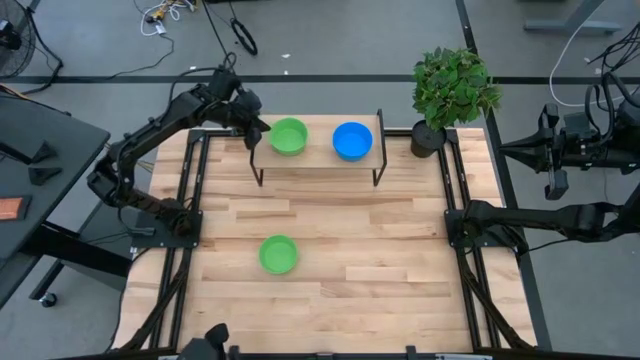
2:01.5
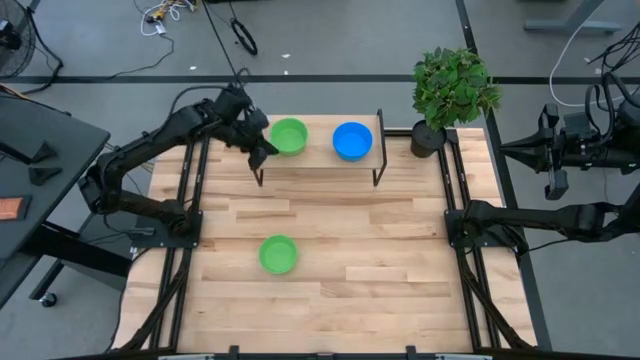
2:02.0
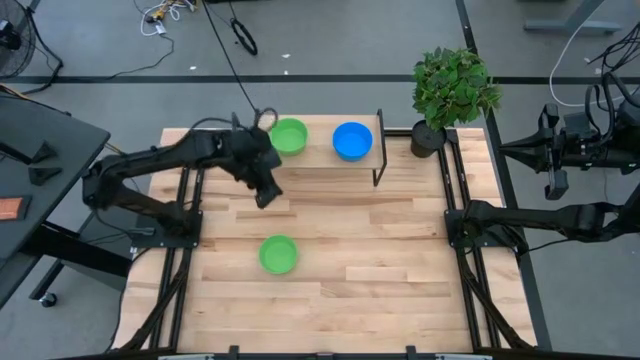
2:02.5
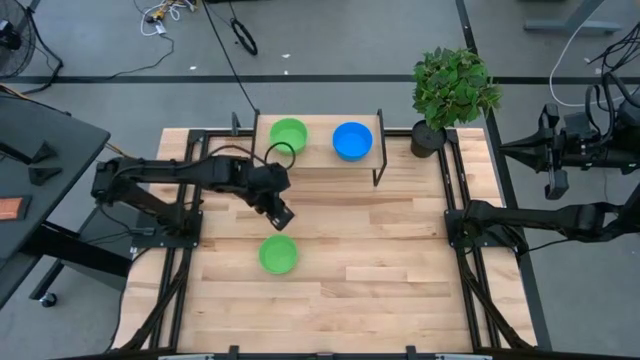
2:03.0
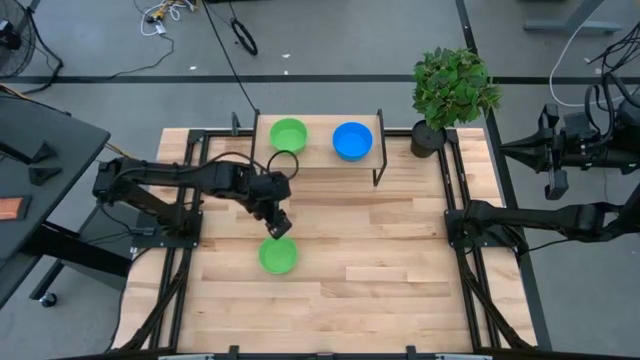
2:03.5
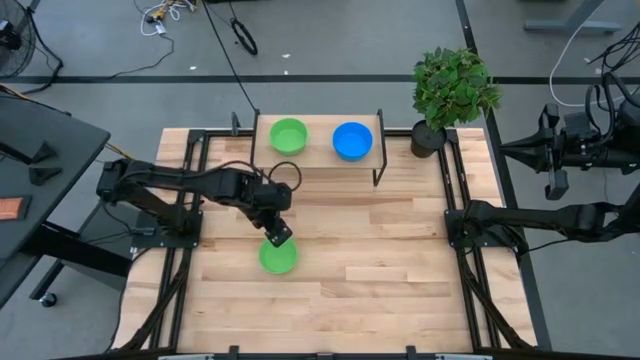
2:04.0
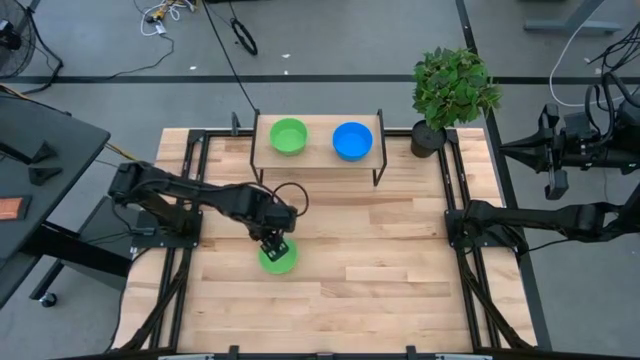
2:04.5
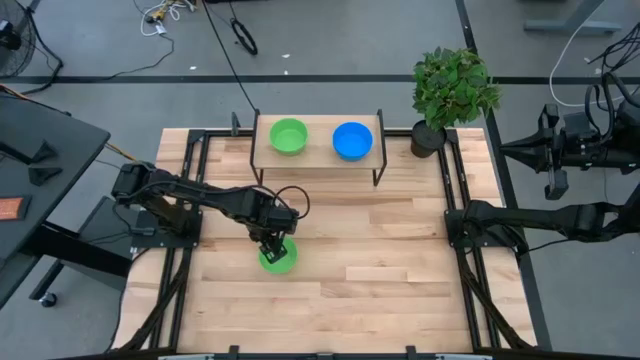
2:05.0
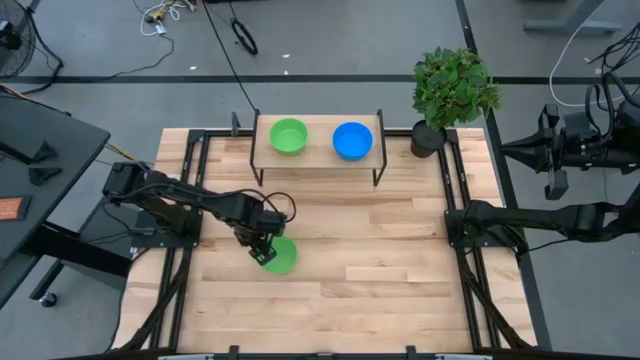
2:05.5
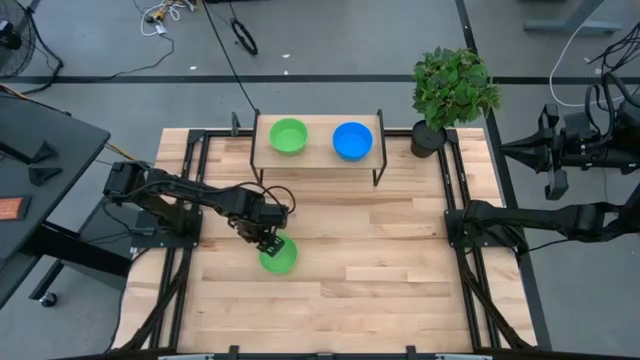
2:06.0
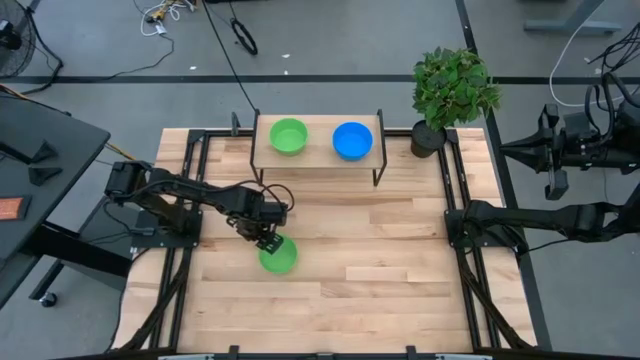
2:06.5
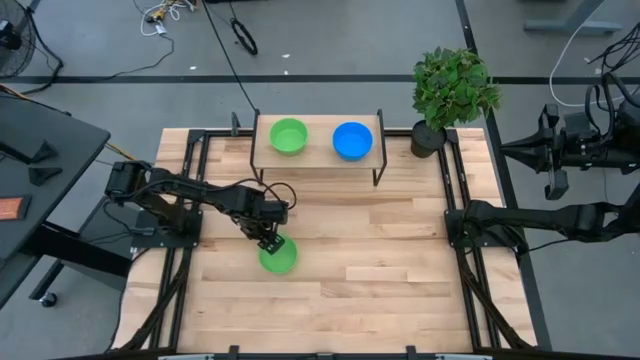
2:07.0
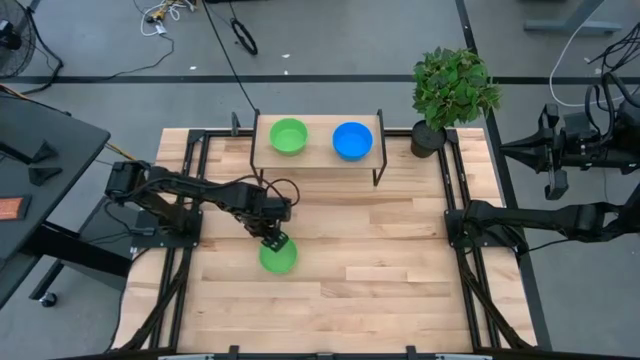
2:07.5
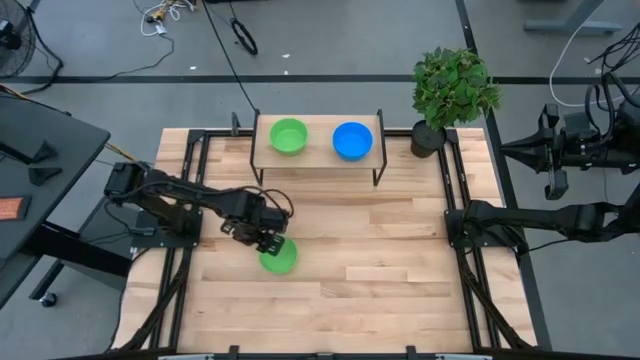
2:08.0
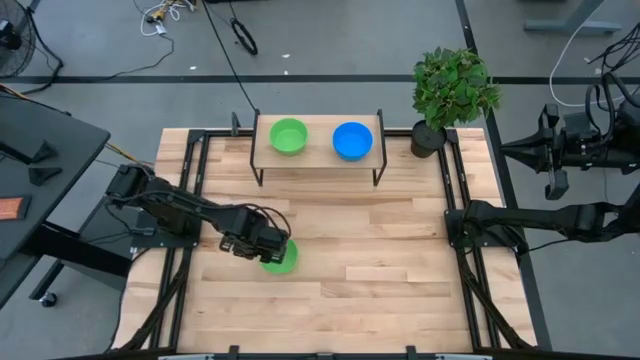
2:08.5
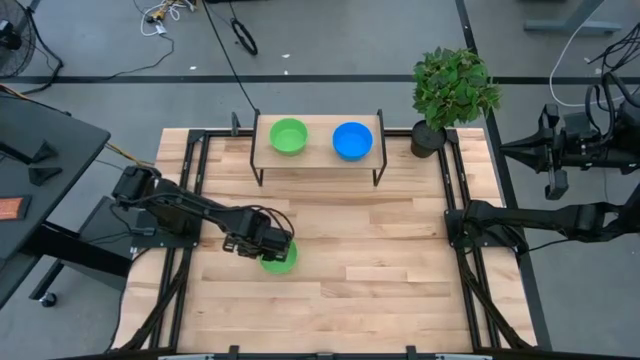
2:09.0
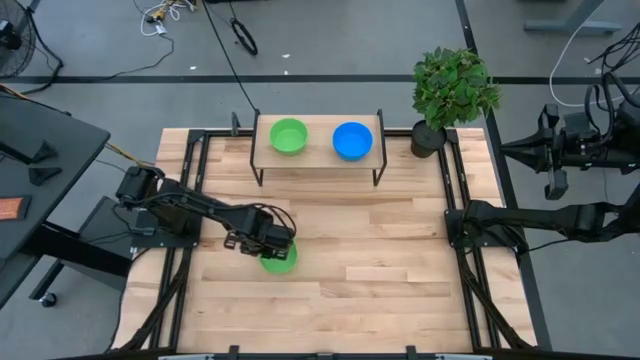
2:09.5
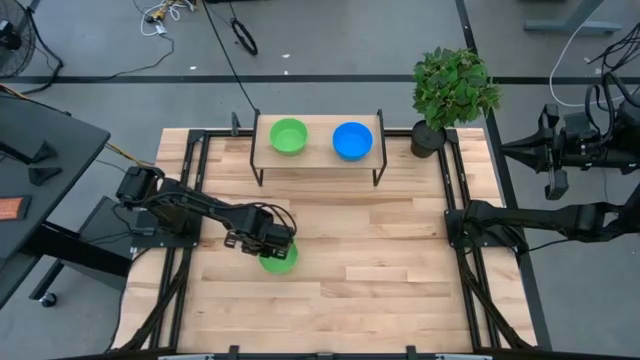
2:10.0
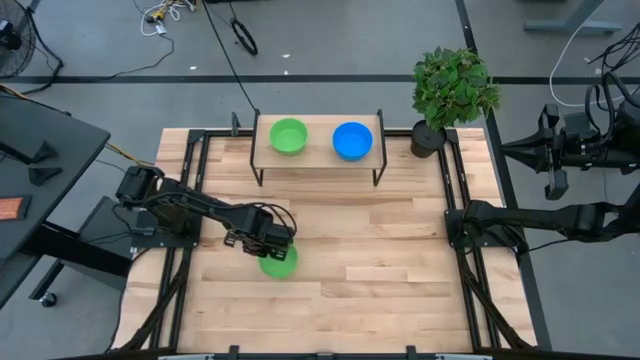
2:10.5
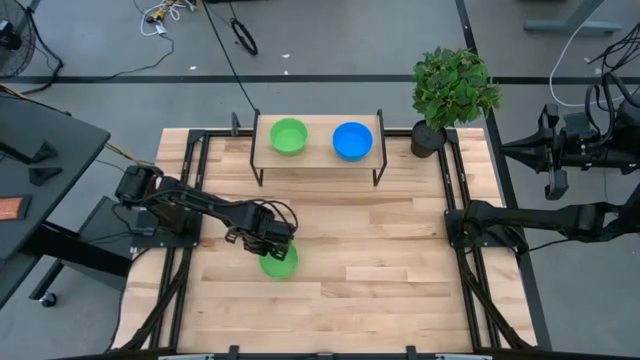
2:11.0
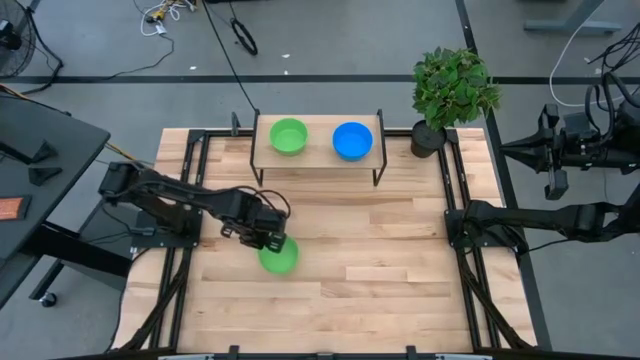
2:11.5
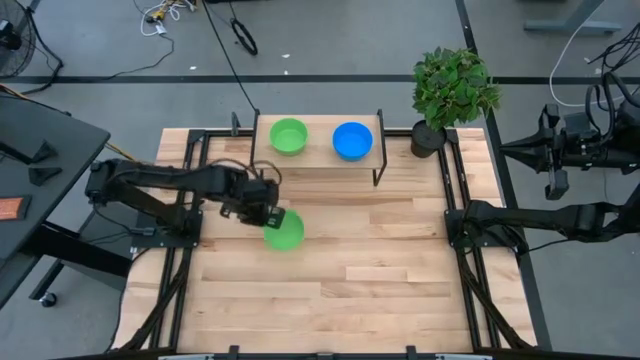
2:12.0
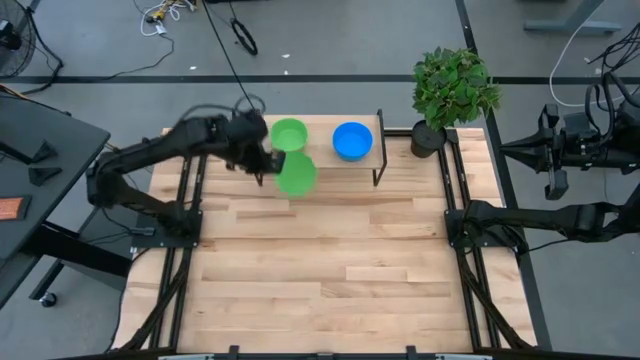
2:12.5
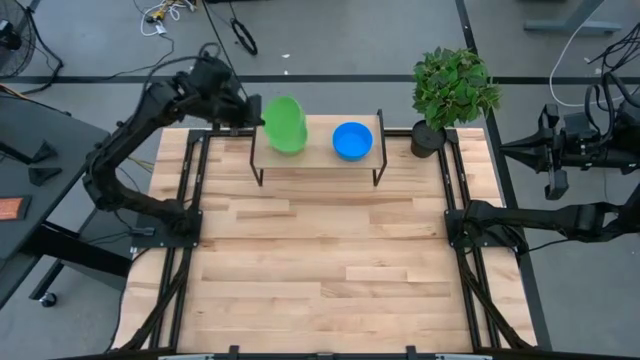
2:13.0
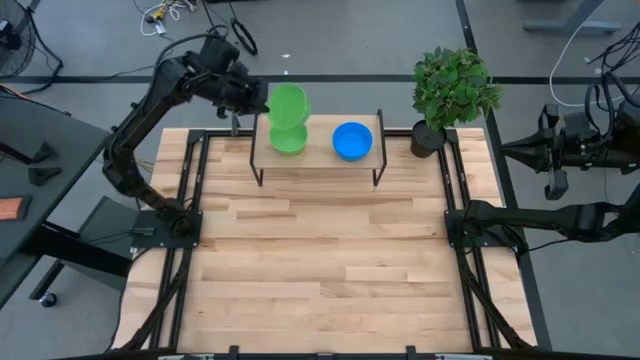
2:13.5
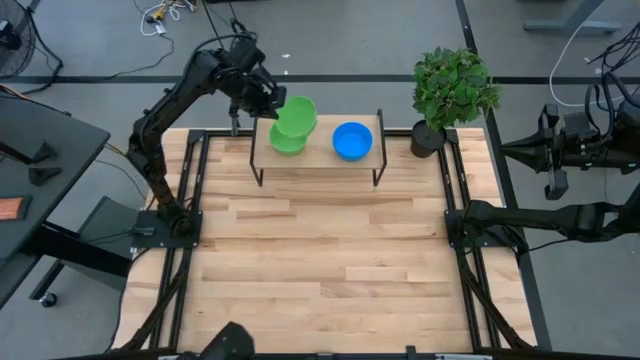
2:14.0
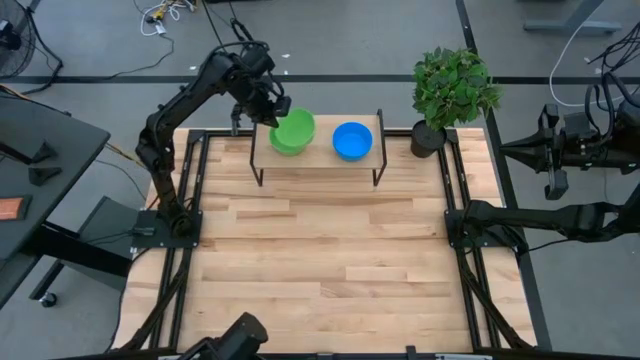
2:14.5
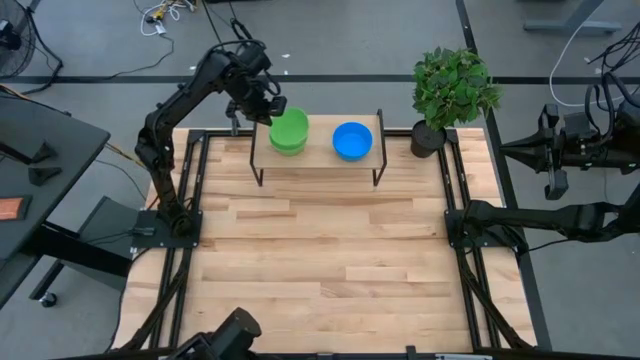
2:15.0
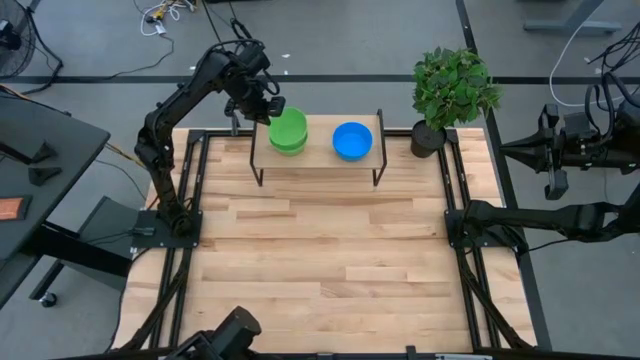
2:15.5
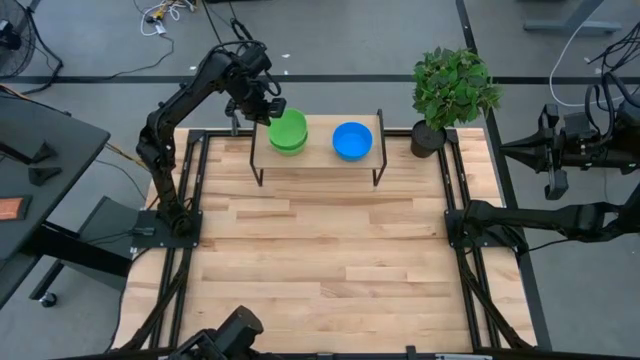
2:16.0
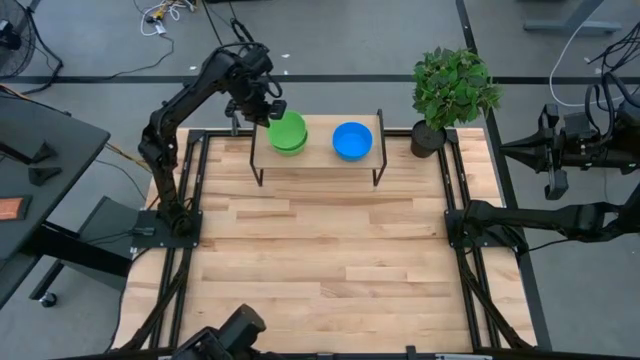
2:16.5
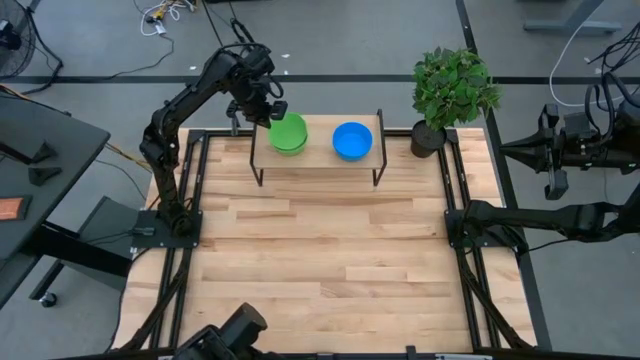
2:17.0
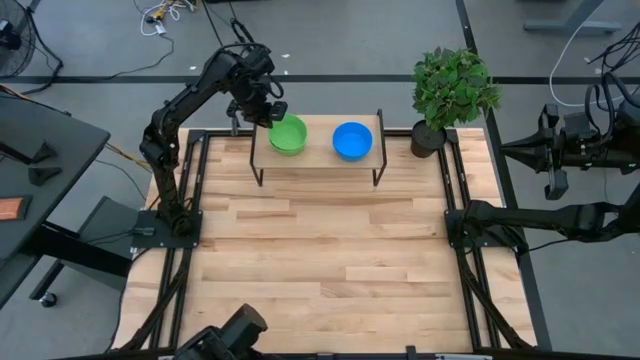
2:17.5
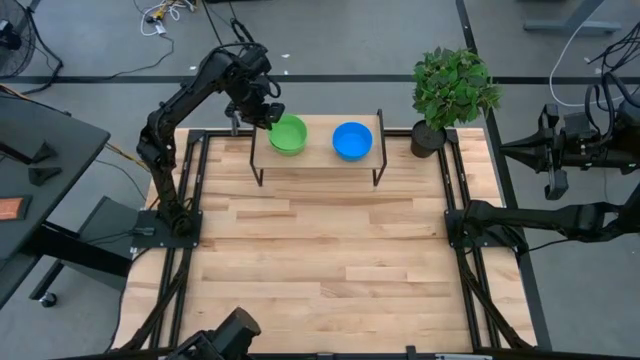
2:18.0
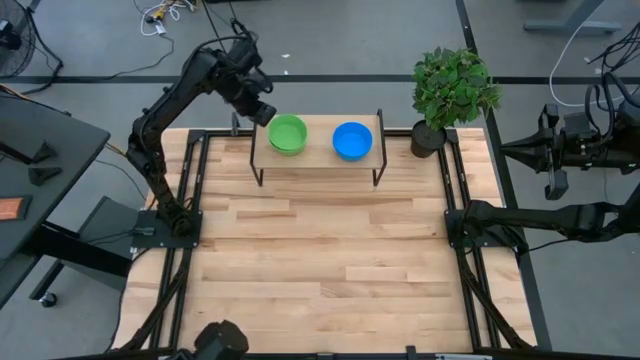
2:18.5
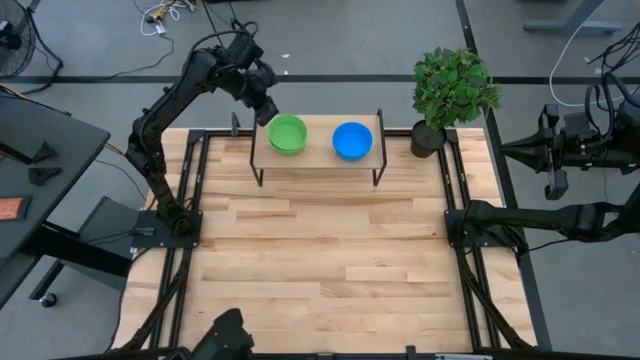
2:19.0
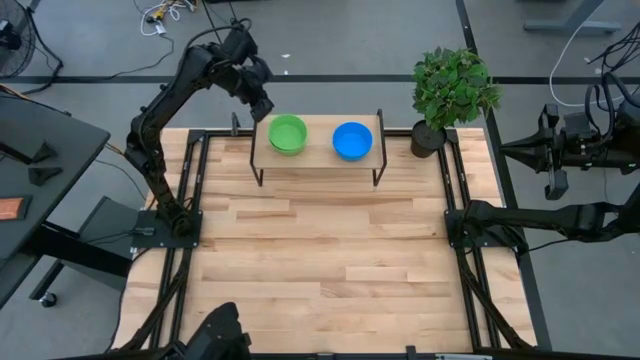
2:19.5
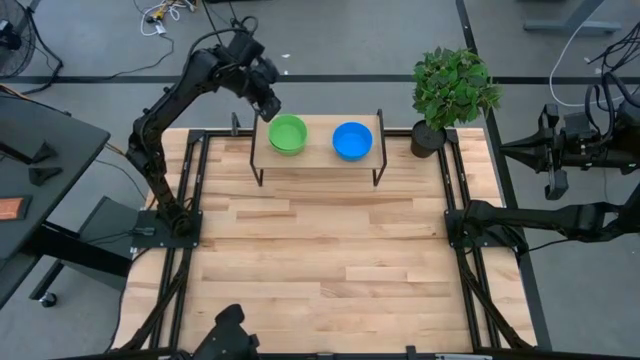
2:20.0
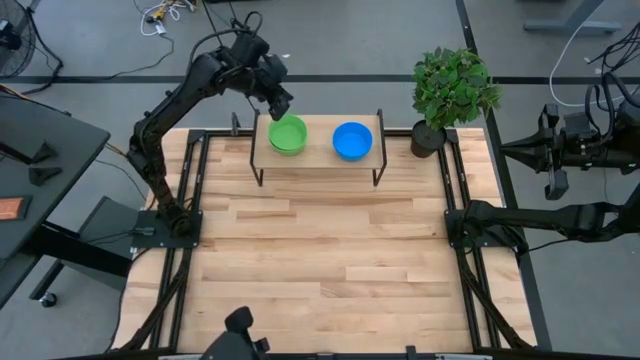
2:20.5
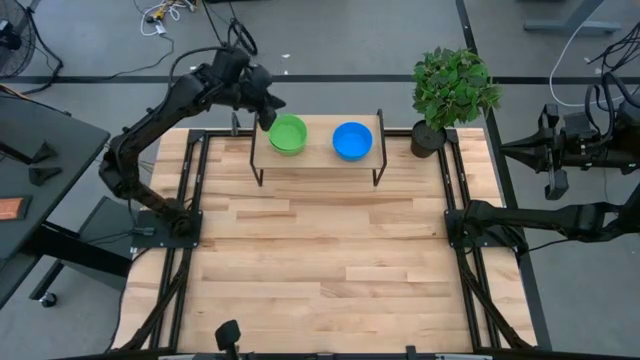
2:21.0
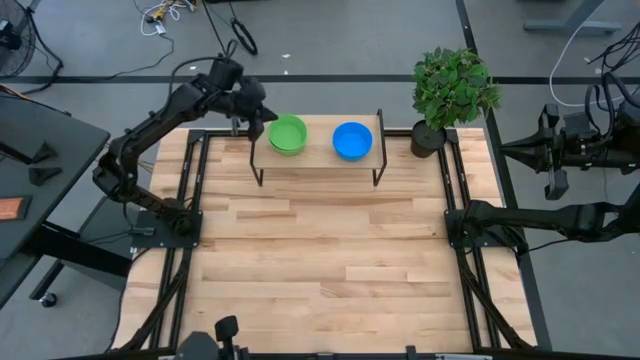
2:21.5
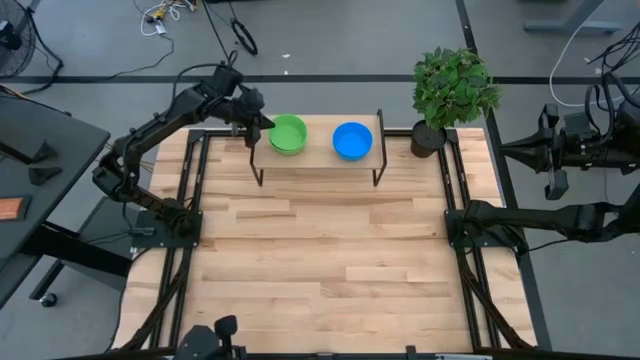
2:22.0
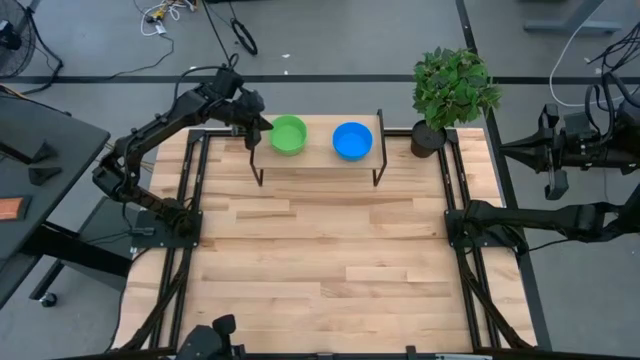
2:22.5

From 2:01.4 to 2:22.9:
Task: Pick & Place Mini bowls
Stack the green bowl on the green bowl on the shelf
